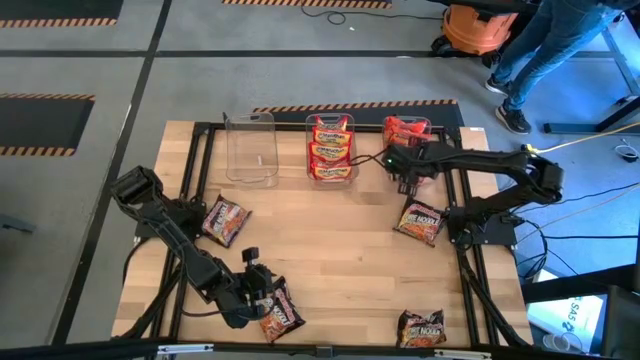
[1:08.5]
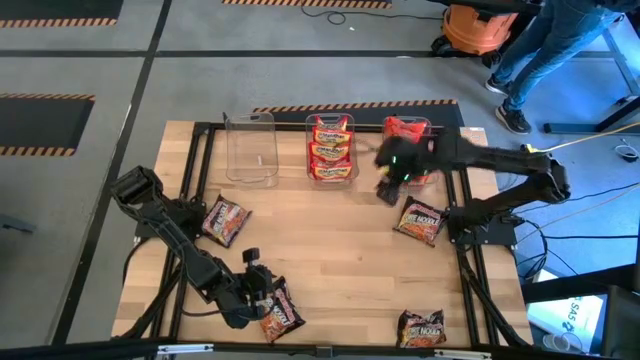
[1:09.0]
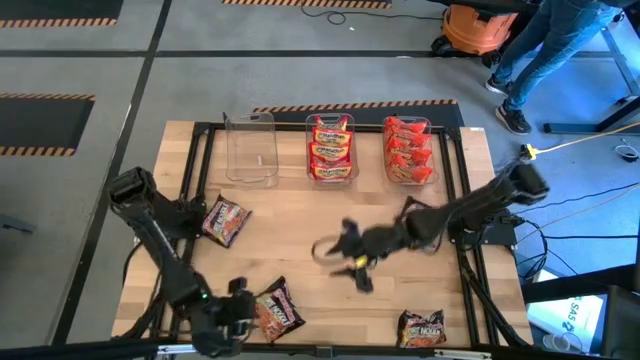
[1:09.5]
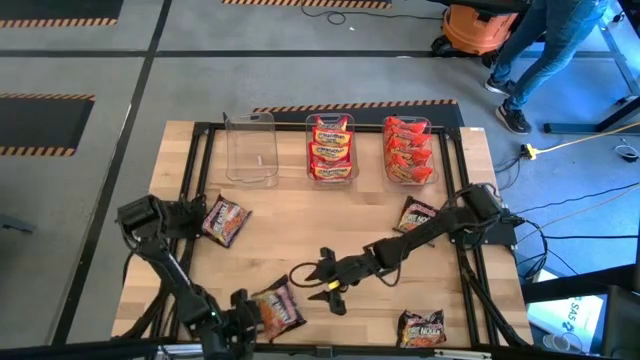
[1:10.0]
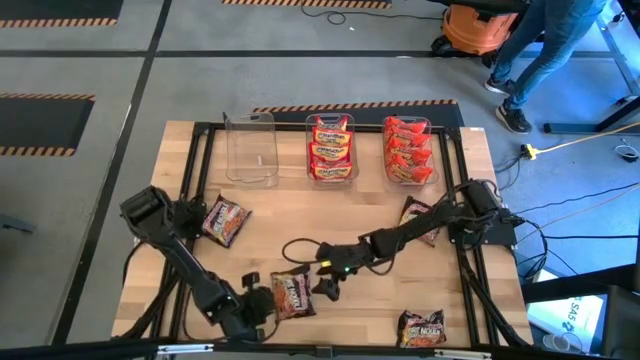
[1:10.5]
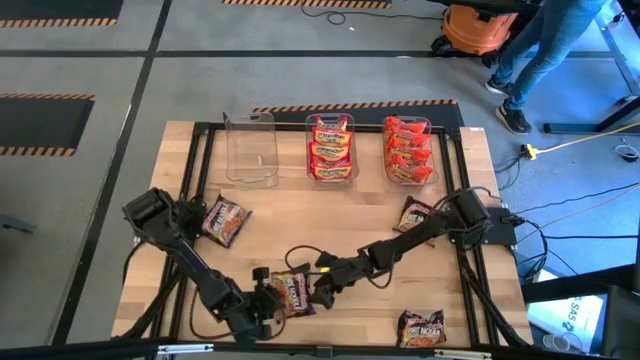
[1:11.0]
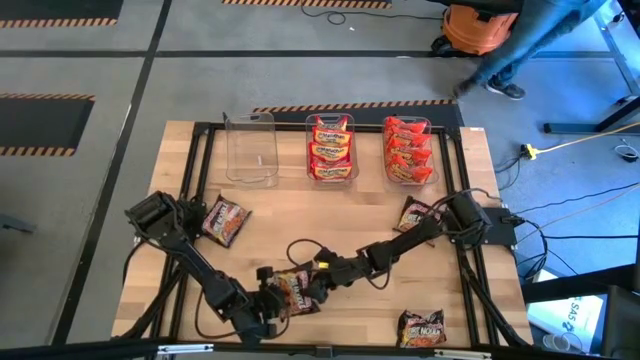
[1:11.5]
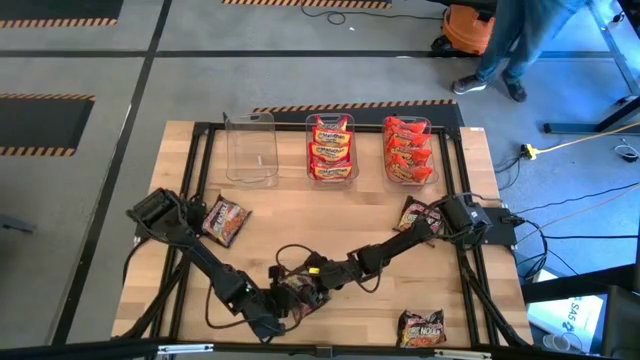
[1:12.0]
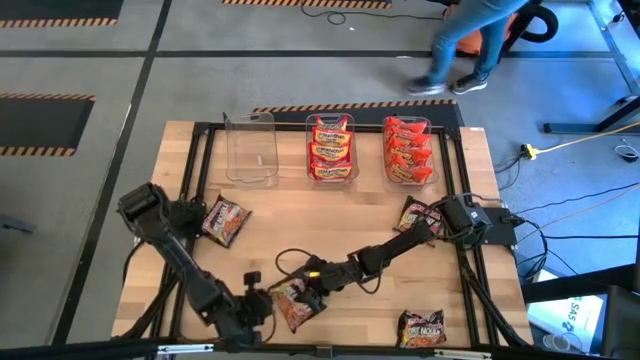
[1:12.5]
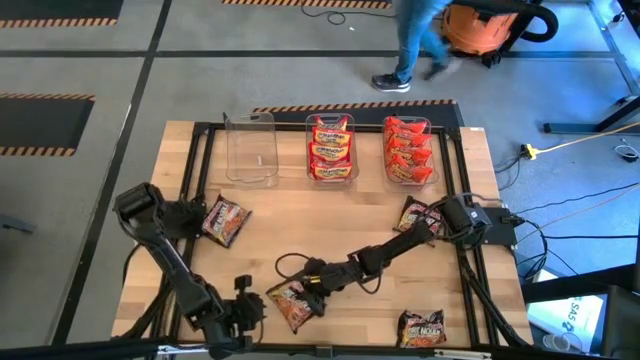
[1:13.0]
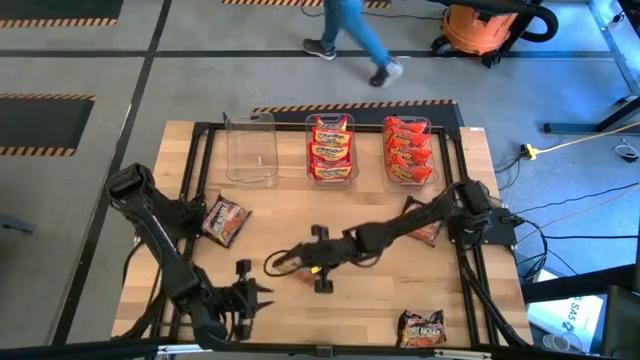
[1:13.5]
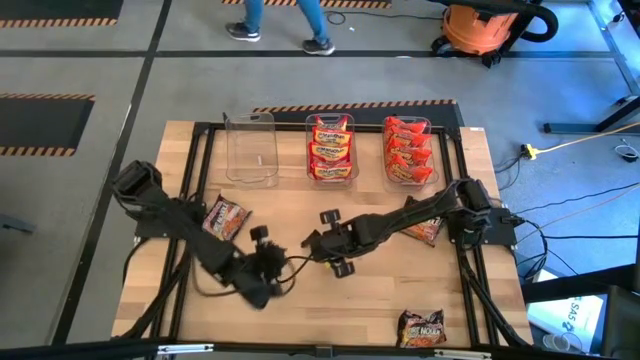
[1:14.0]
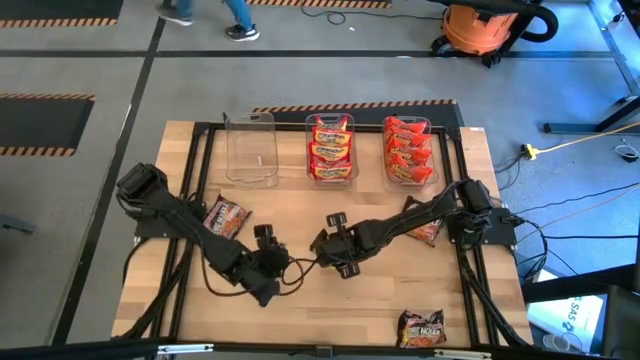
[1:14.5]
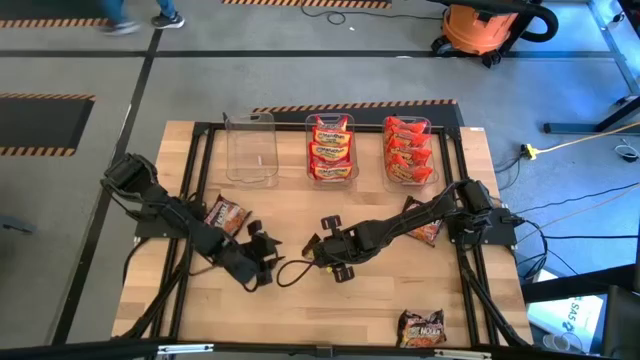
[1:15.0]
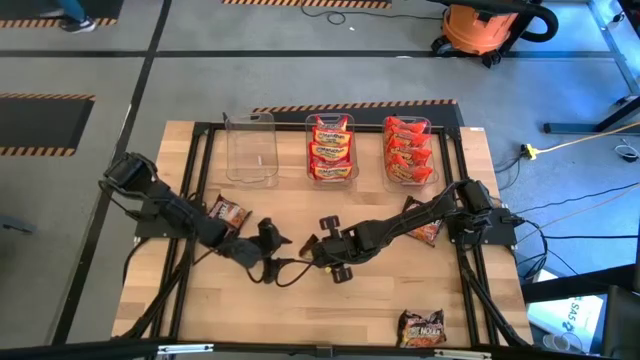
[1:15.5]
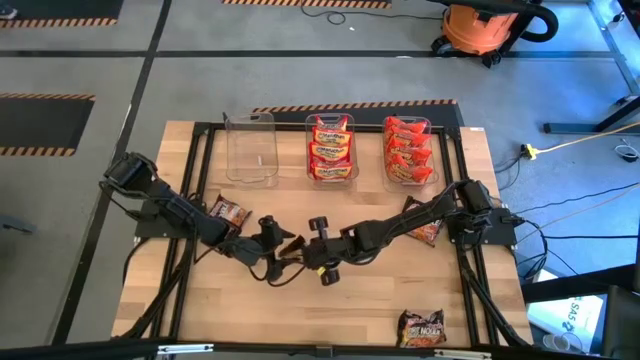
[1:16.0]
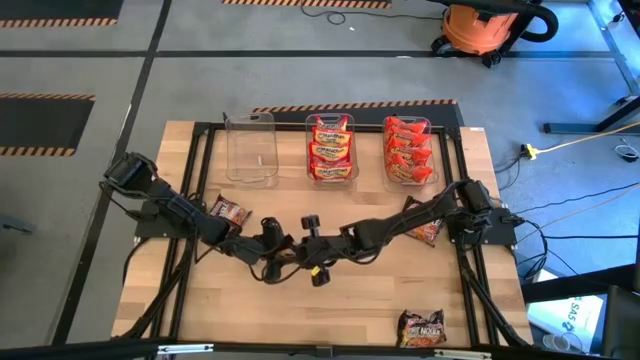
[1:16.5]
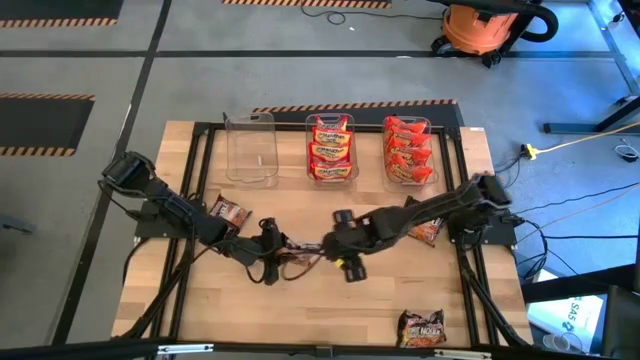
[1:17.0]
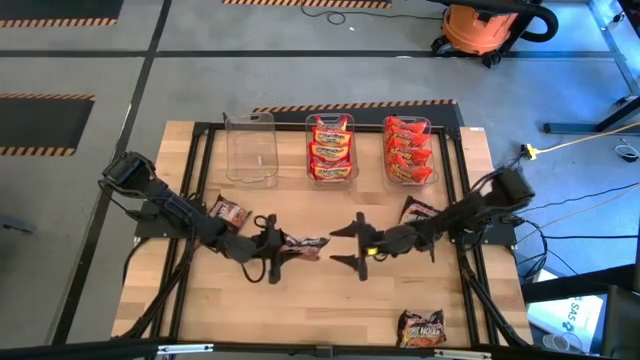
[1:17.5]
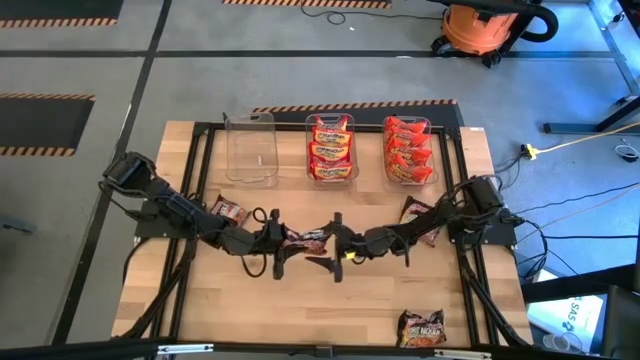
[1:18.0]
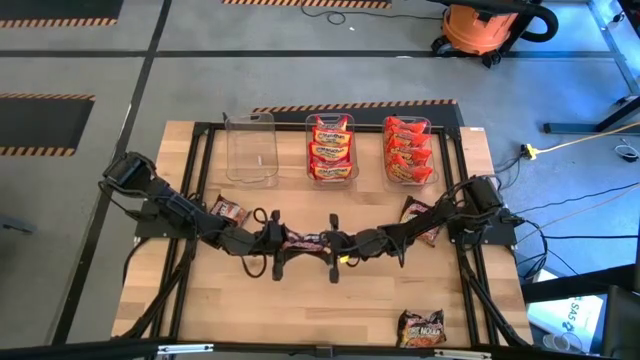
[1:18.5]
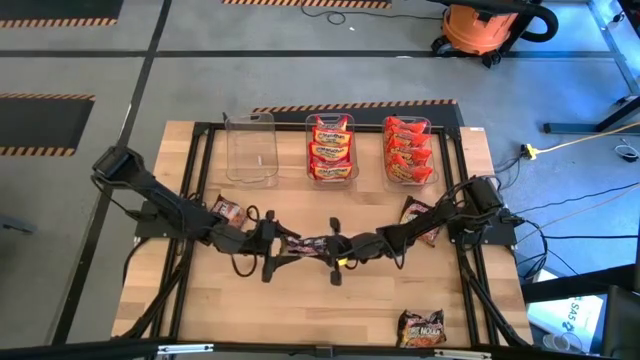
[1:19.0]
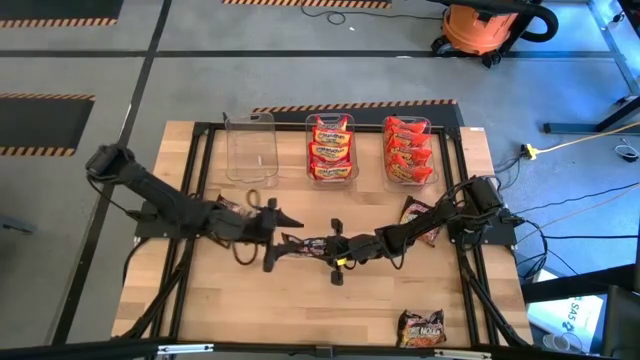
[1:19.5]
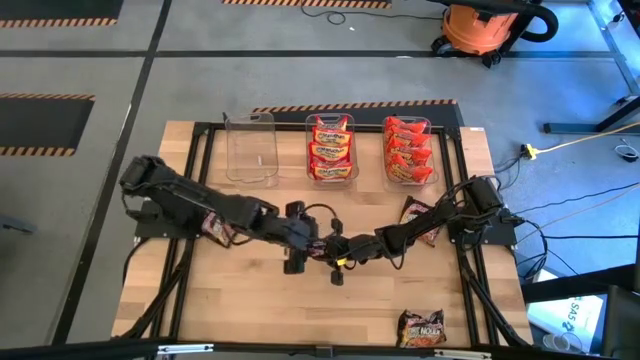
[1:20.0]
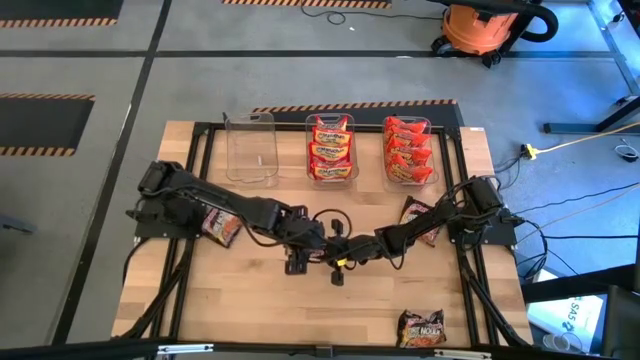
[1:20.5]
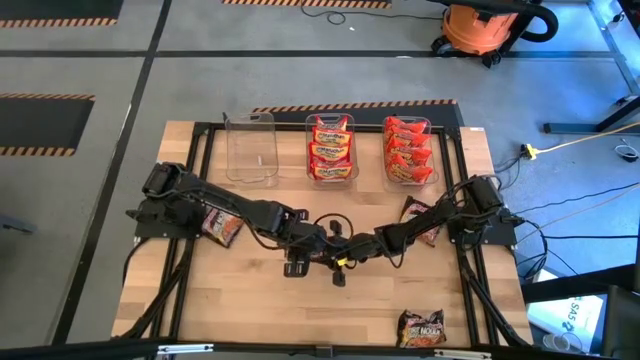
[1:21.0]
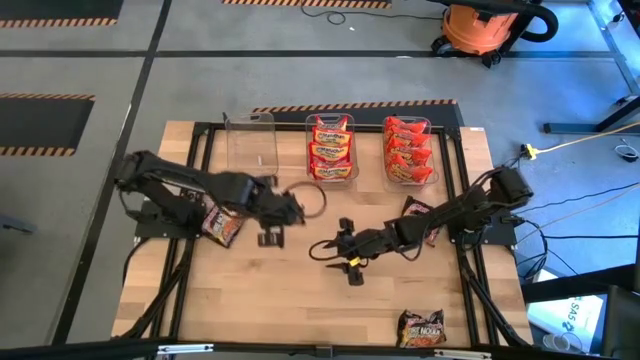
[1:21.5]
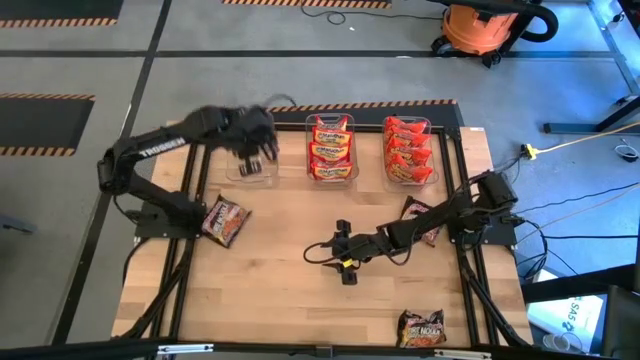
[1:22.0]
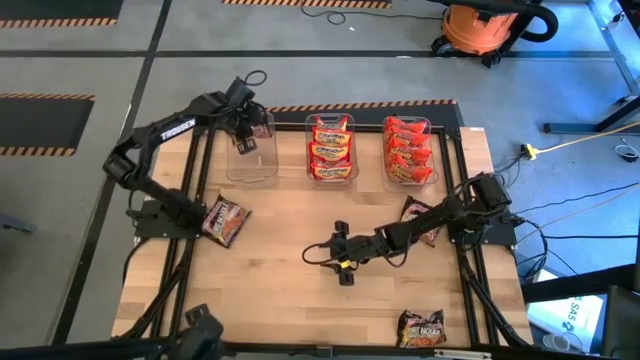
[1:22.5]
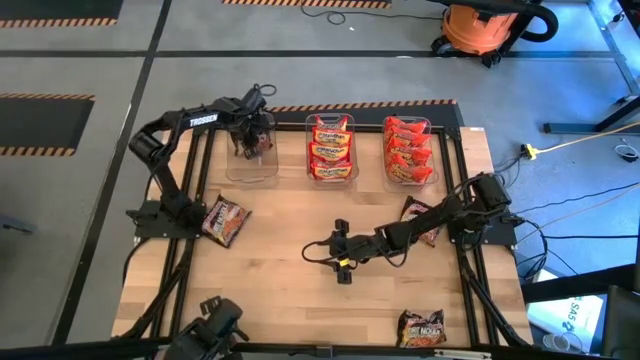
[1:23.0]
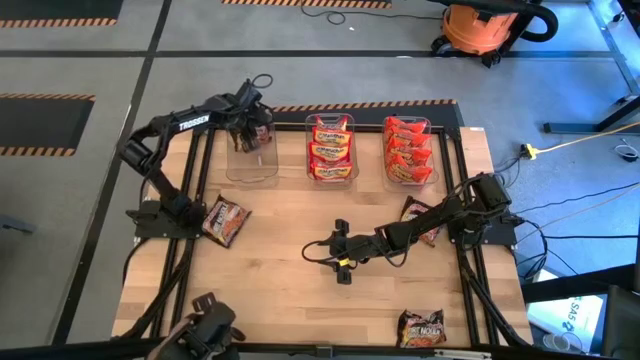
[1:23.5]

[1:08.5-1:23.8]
Task: Sort Maruchan noodles
Put the black noodle pack into the left transparent bin

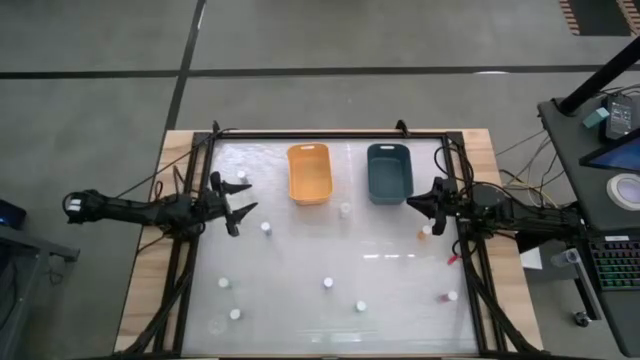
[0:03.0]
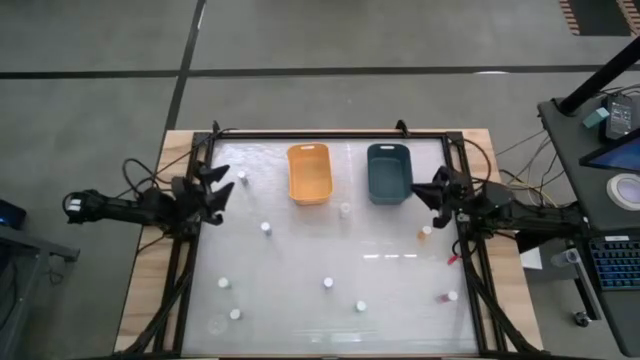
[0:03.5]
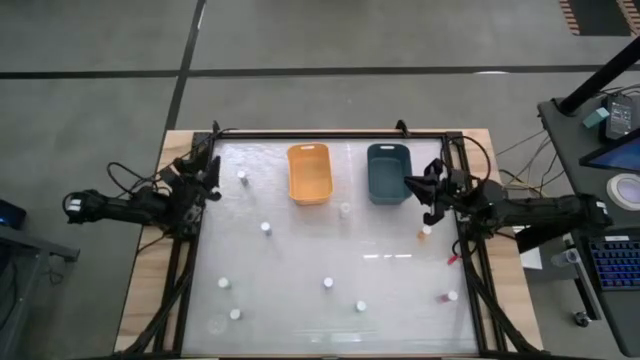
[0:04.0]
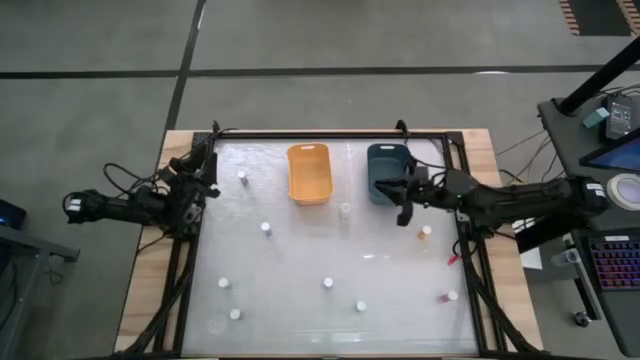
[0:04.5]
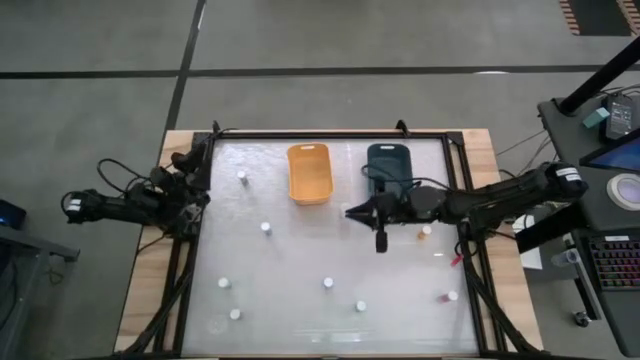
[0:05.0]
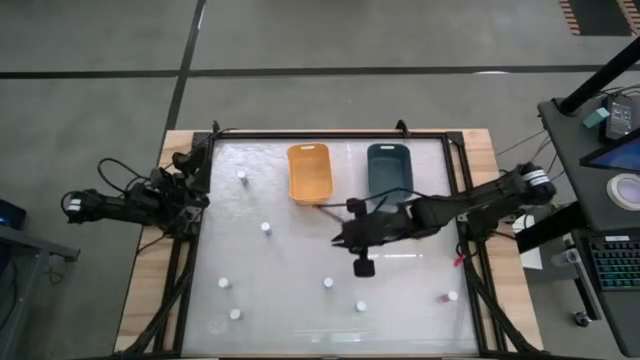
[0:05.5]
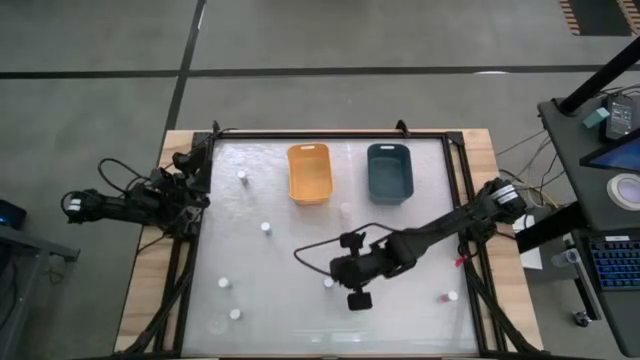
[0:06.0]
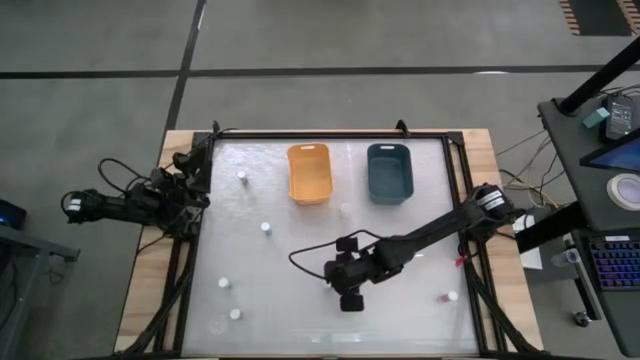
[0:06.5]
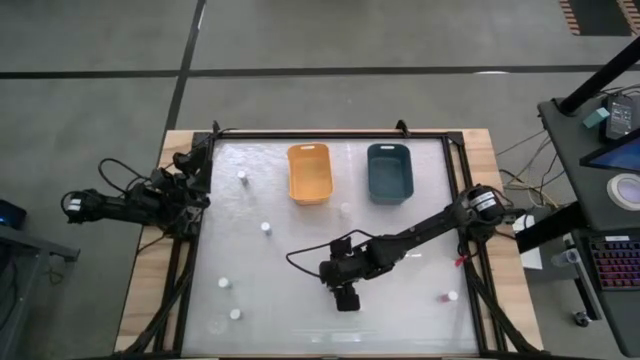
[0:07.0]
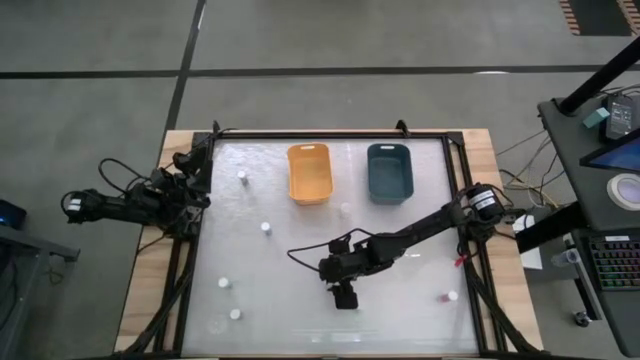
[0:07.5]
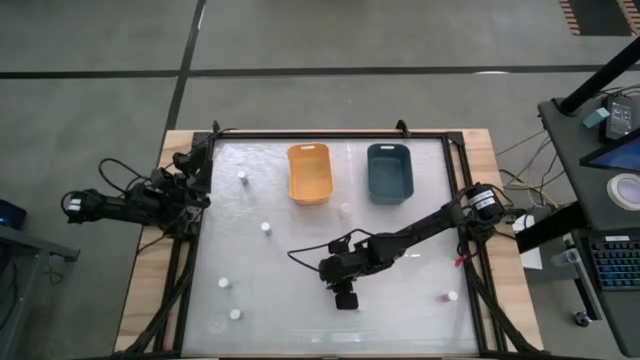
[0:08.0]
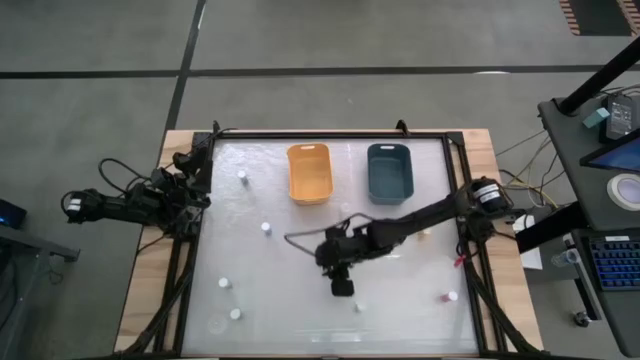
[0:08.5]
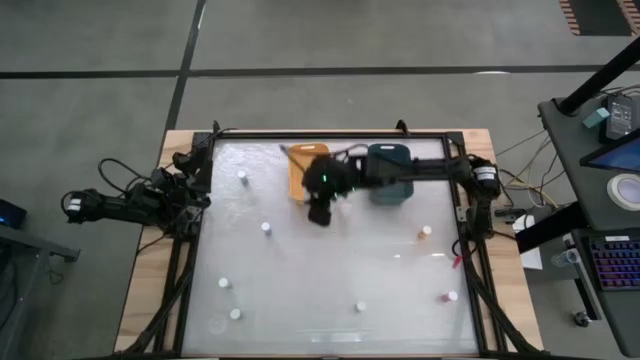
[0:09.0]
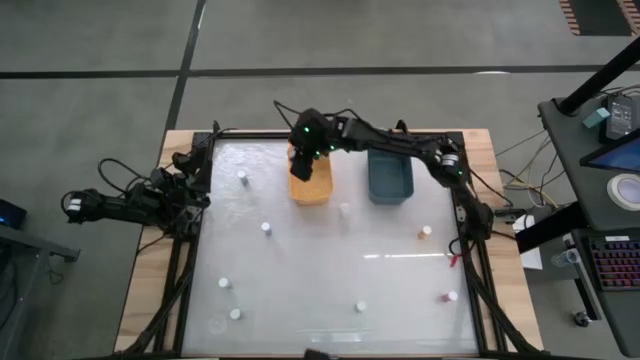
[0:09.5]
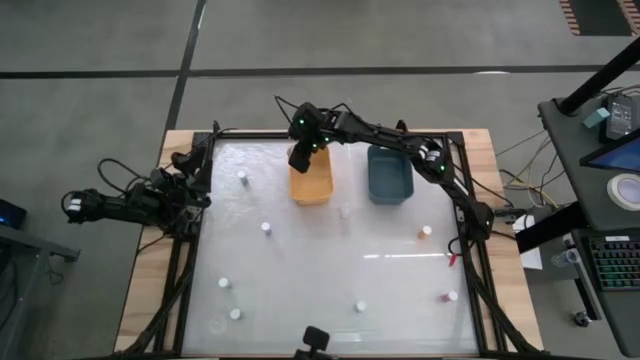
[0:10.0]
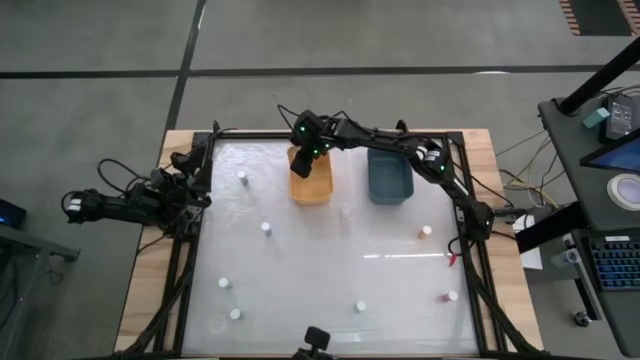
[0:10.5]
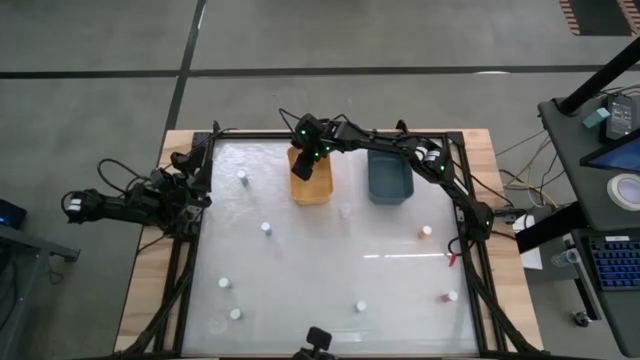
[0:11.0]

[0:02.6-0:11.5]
Task: Pick and place medicine bottles into bin by pill shape (circle, oval)
Put the blue capsule bottle into the yellow bin
